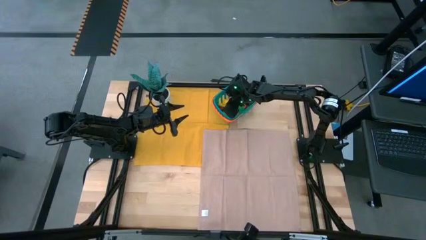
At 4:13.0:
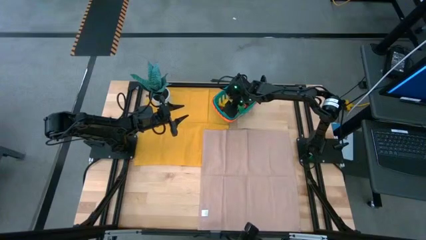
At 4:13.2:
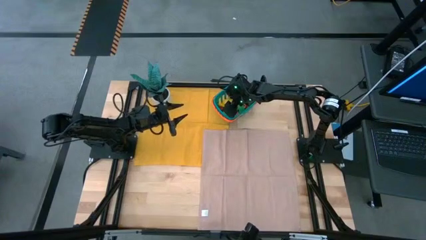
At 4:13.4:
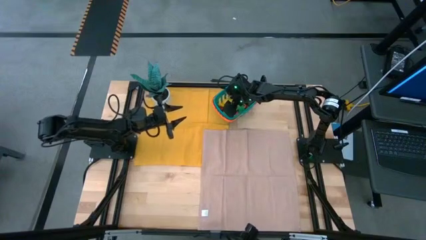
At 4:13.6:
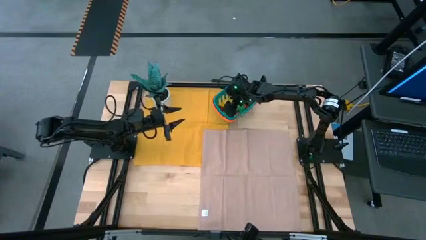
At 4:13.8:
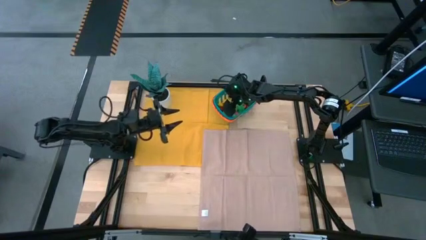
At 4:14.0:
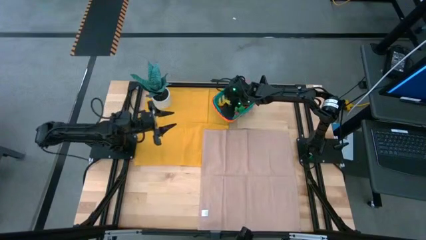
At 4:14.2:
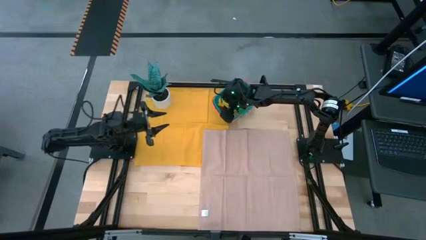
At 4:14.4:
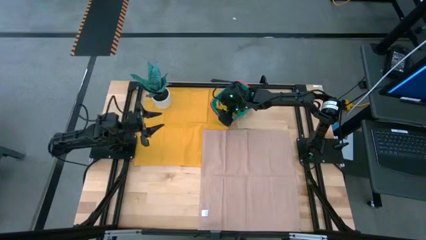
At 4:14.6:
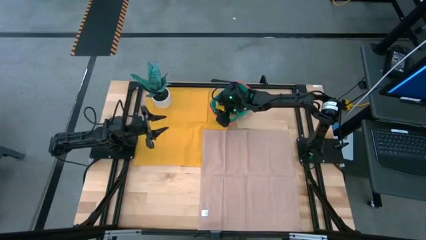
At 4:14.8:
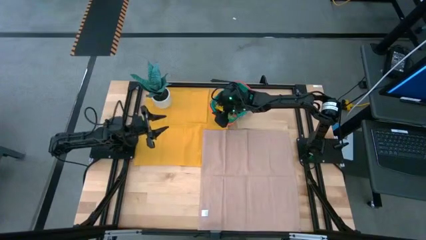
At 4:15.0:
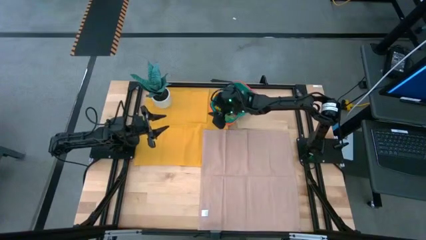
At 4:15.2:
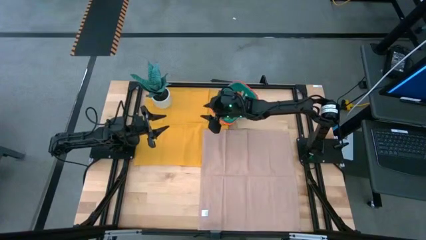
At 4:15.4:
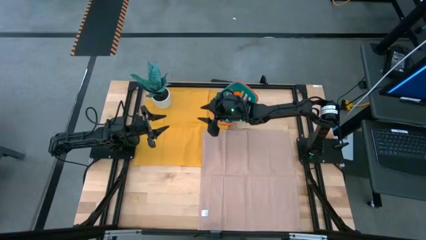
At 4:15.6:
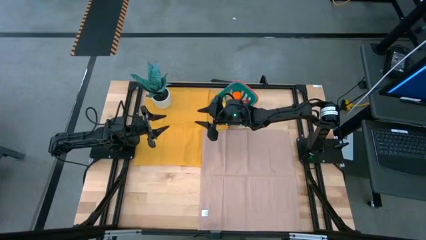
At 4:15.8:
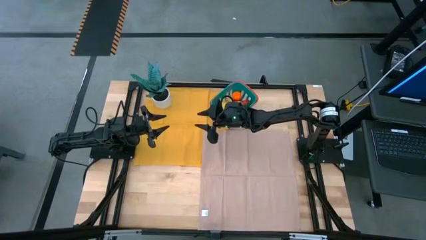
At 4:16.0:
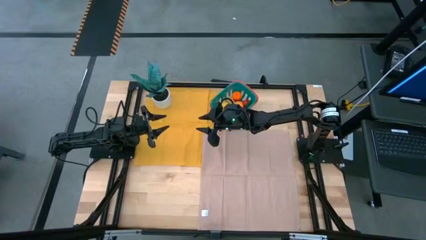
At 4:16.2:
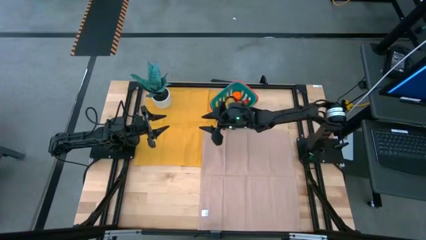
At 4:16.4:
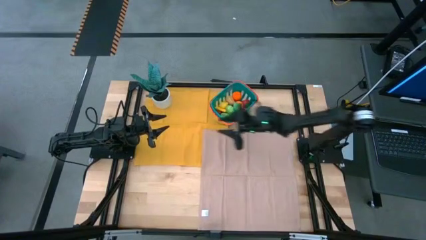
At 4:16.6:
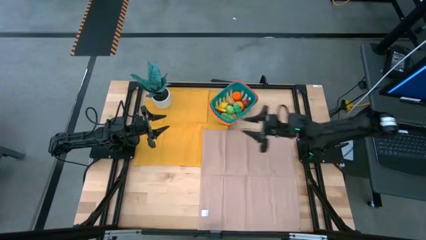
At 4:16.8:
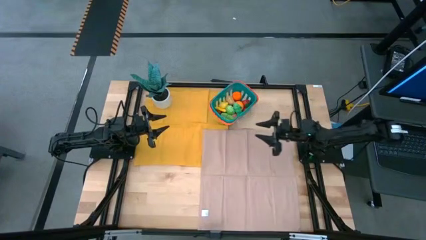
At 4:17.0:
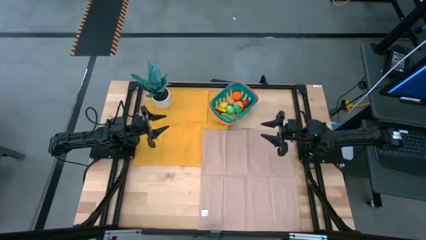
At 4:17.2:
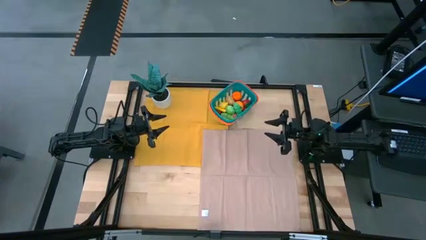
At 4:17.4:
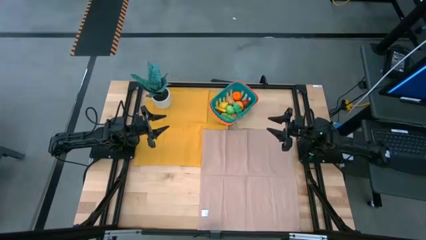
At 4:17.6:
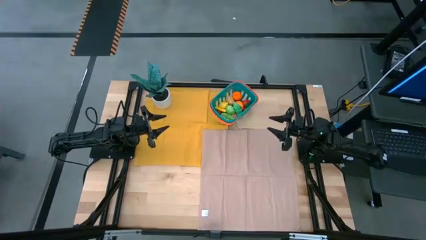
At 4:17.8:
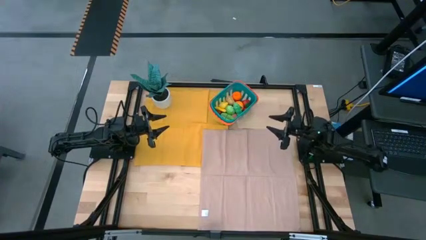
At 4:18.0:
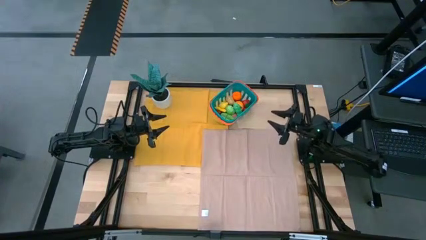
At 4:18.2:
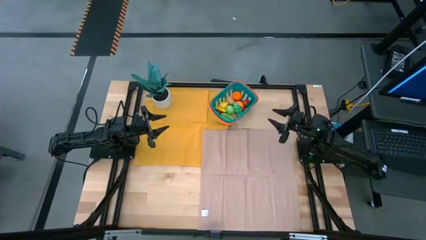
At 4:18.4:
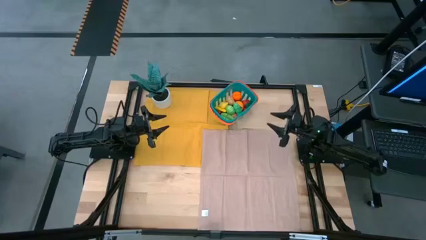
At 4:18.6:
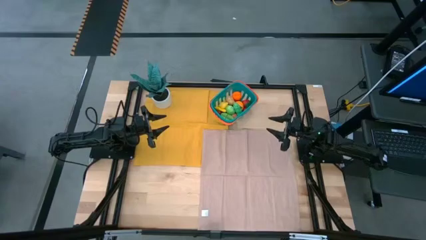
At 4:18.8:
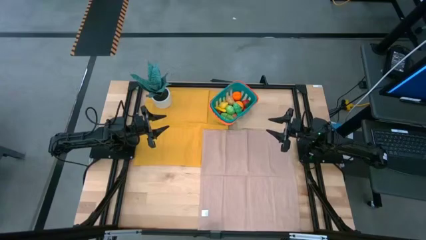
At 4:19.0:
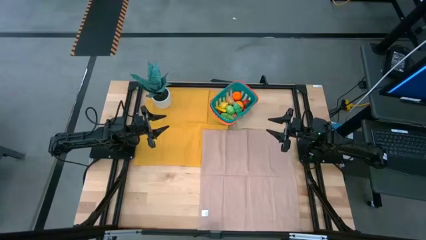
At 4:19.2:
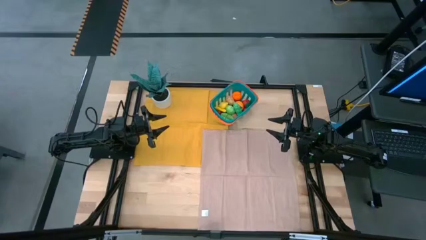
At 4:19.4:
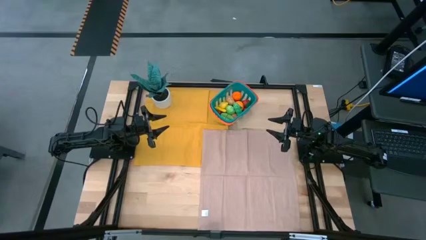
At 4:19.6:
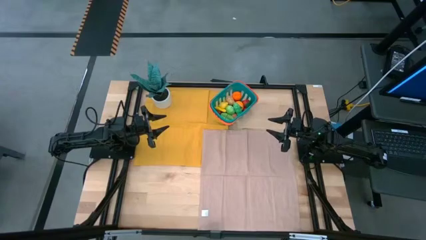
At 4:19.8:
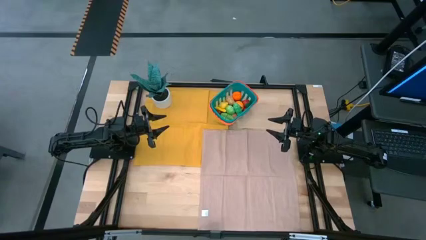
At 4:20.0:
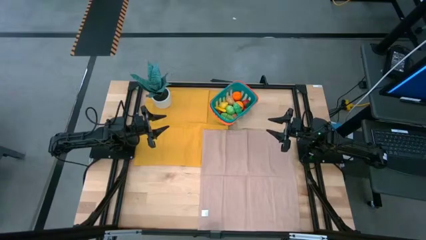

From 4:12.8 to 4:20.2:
Task: Pick and placing Produce into tupperware
Return to home position

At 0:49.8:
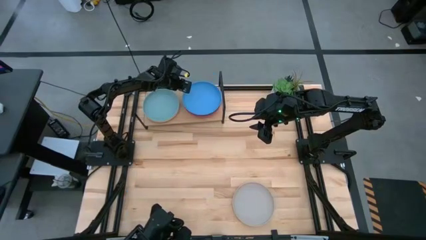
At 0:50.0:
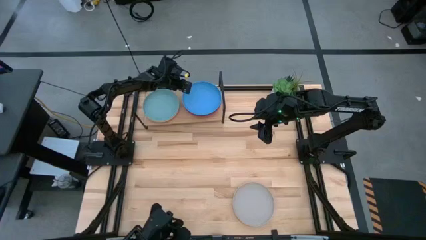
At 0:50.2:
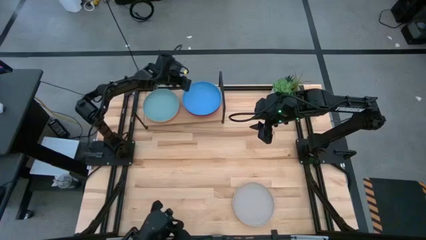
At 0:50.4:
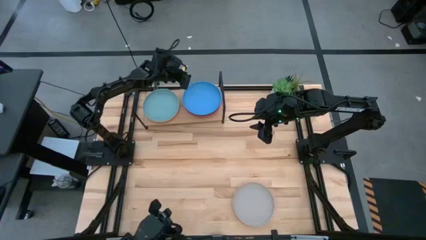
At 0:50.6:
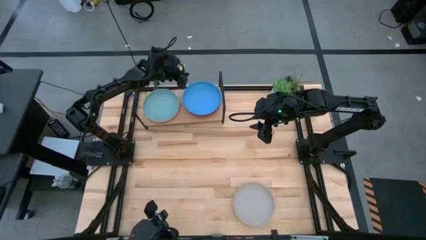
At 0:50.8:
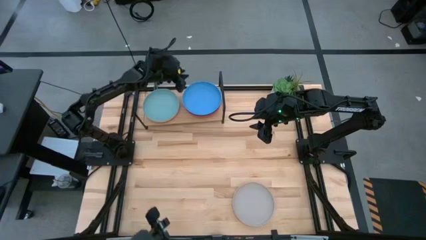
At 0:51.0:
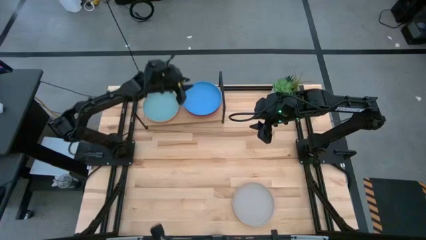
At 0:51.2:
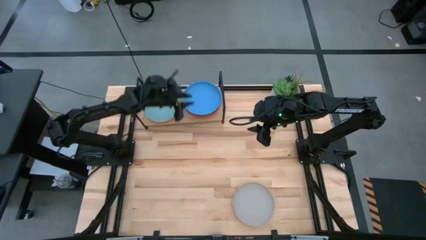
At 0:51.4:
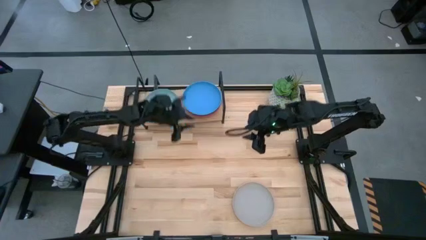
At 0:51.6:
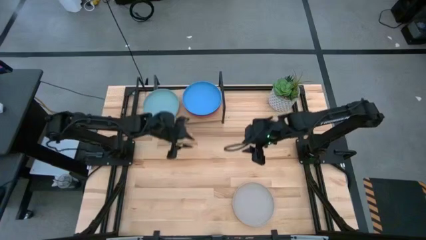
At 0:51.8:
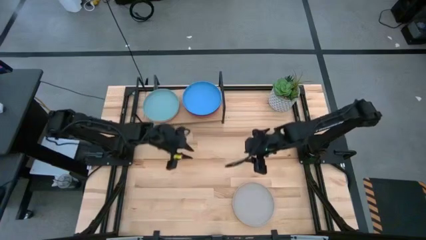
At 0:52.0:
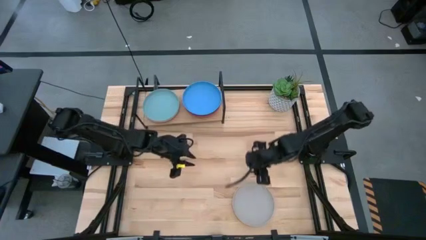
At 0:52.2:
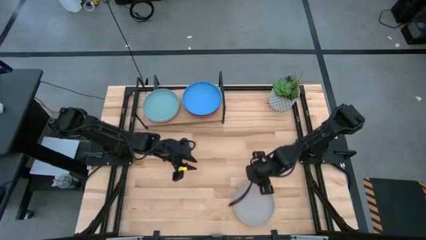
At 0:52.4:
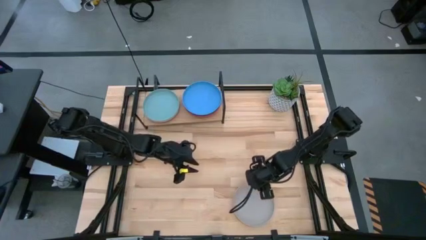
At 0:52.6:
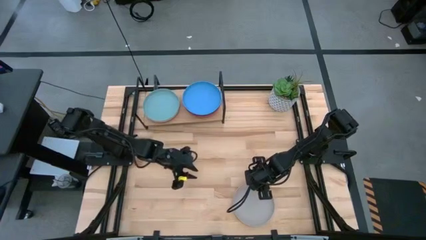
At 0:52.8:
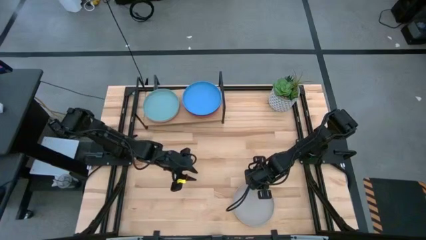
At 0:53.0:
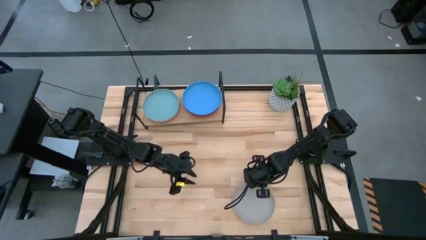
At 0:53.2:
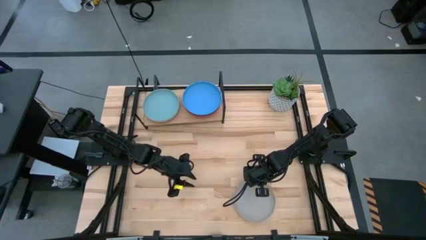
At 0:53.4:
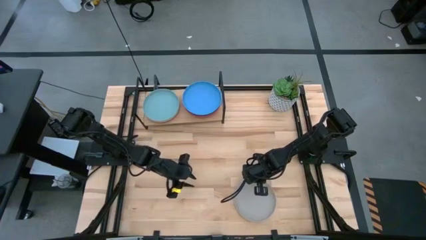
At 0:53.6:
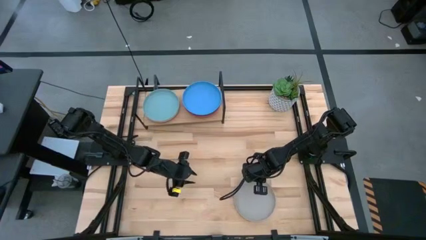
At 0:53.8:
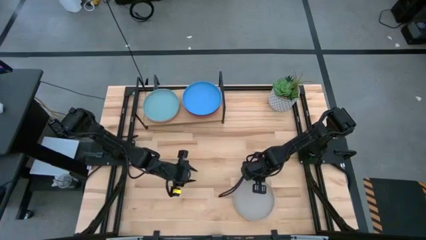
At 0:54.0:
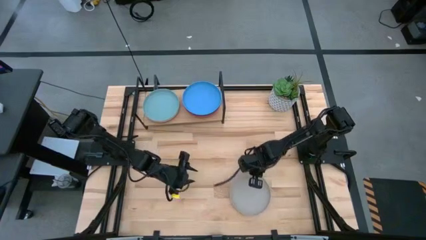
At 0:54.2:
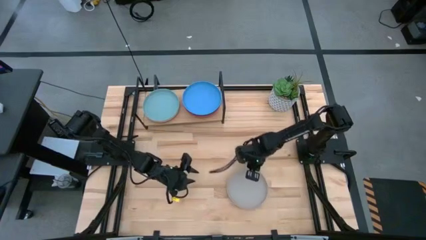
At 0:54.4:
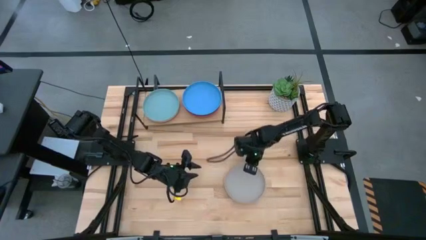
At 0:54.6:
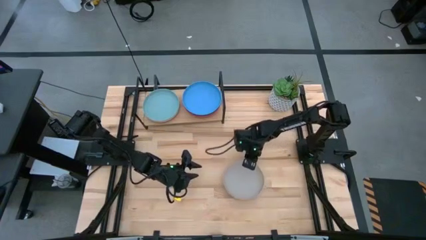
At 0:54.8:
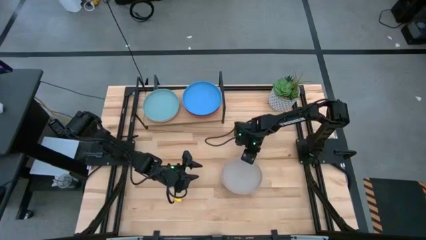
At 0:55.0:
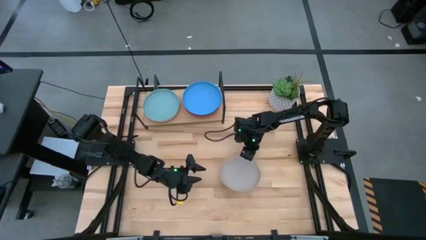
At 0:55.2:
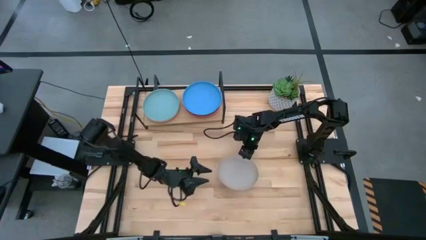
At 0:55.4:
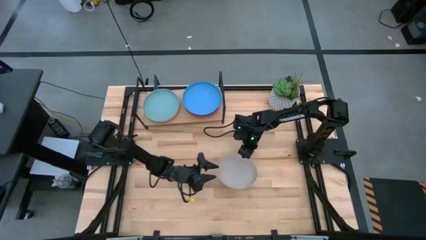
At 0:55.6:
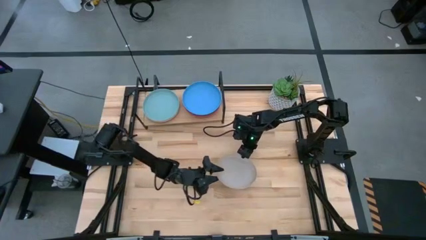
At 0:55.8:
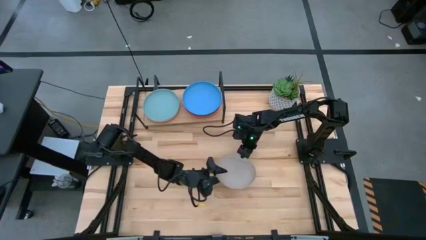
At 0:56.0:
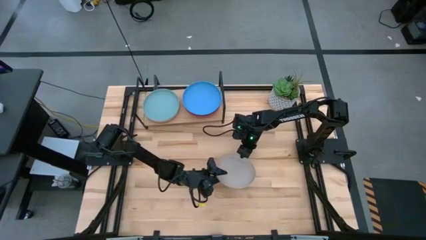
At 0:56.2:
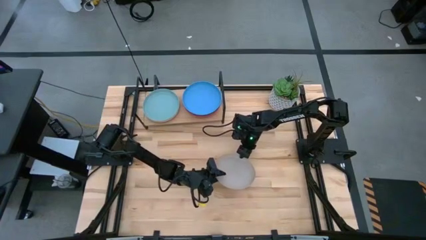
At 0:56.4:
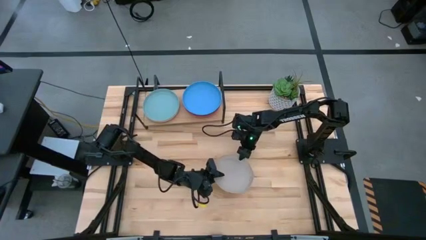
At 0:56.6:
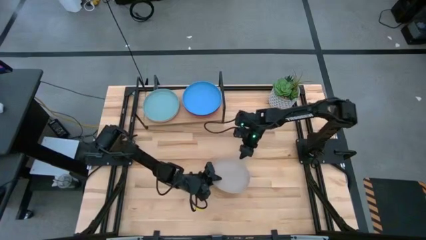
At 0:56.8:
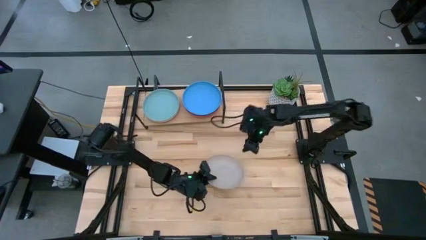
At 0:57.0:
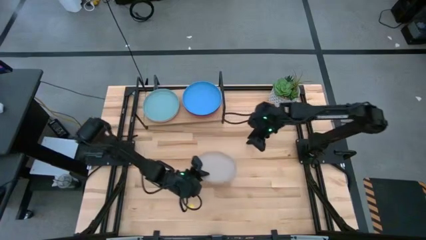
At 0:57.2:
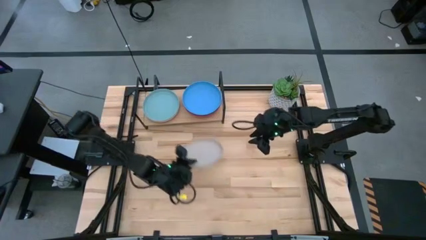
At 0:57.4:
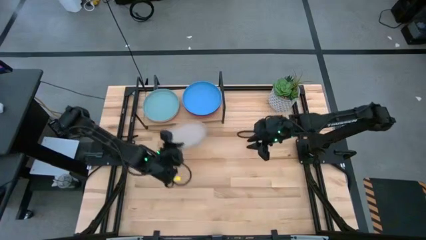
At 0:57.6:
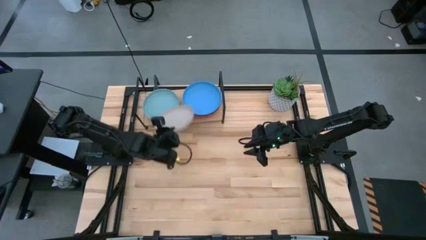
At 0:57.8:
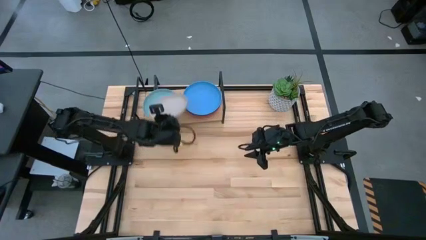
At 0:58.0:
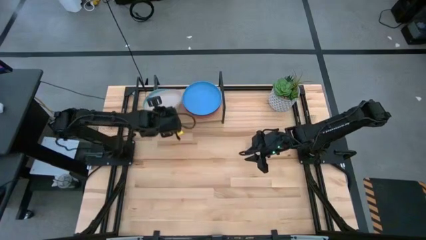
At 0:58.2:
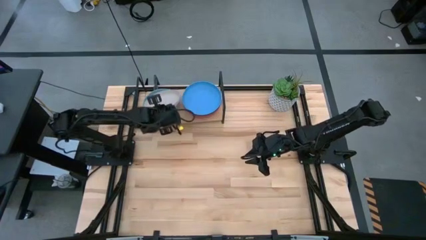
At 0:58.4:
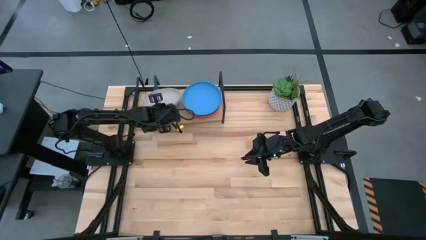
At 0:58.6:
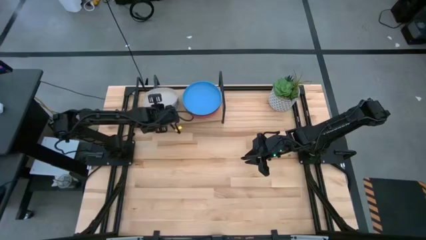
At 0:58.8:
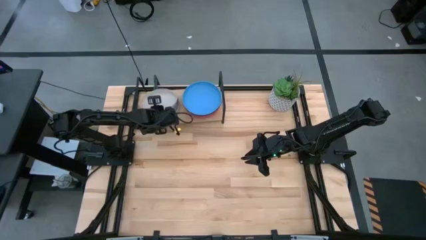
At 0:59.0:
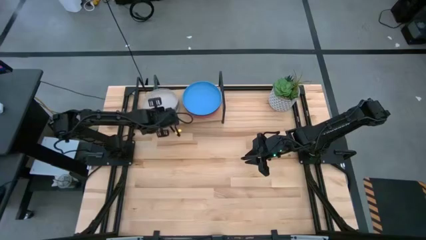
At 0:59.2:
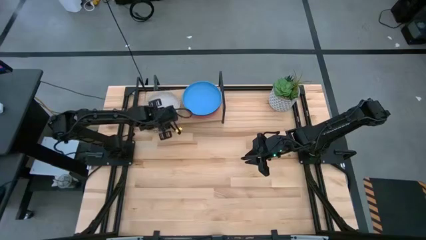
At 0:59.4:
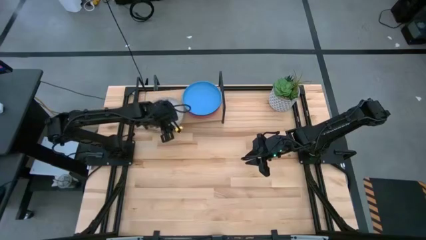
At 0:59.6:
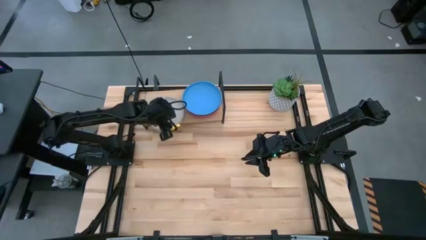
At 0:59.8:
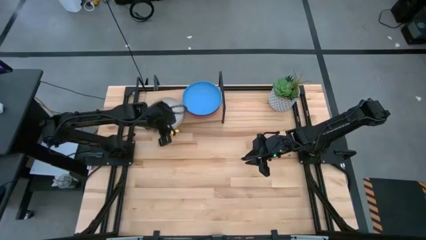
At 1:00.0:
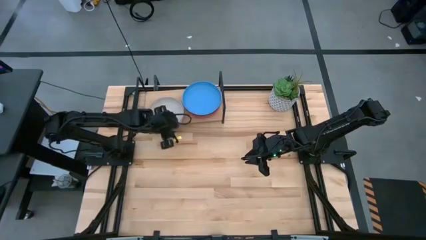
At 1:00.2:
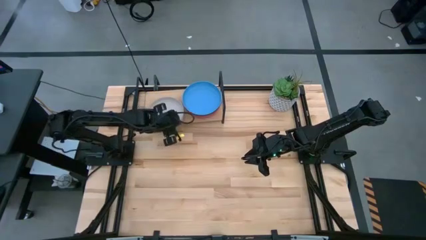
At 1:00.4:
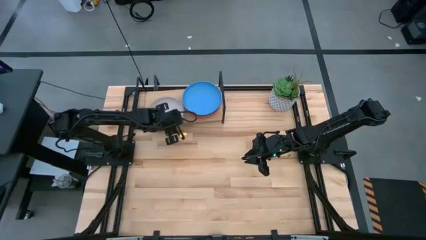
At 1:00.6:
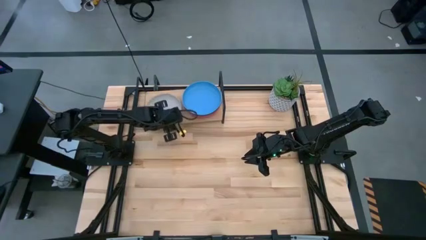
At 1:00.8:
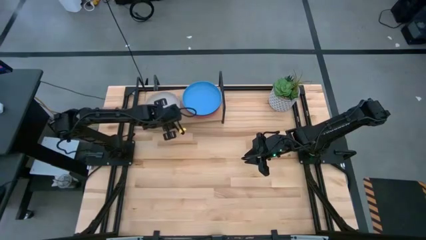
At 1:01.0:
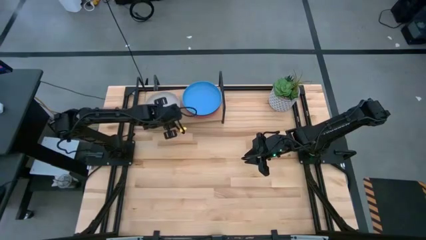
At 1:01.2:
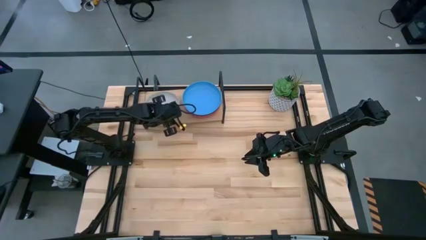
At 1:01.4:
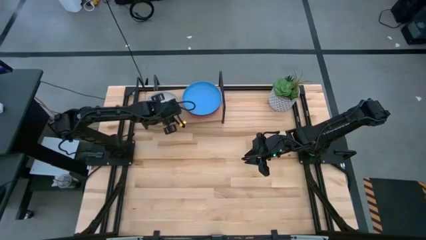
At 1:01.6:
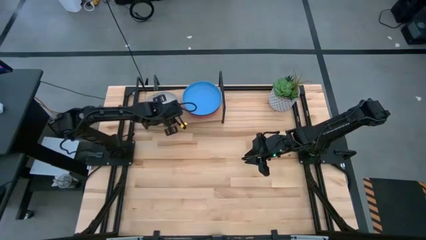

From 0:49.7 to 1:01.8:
Task: Place and stack plates onto a shelf
Stack the gray plate on top of the light blue plate on the shelf
